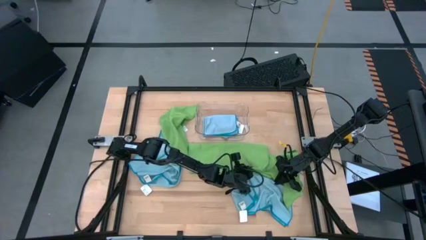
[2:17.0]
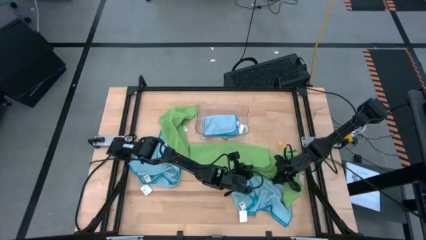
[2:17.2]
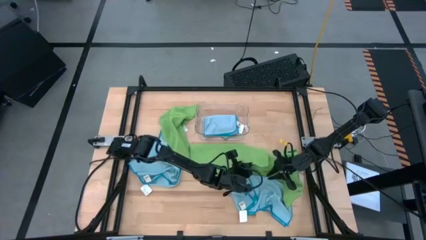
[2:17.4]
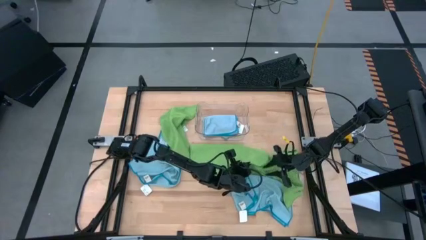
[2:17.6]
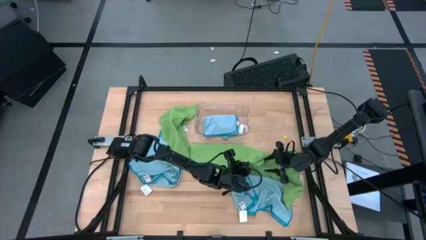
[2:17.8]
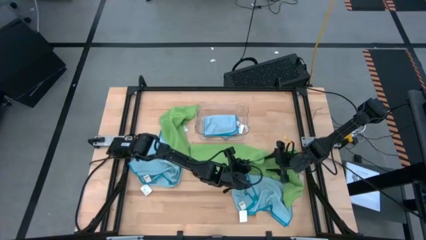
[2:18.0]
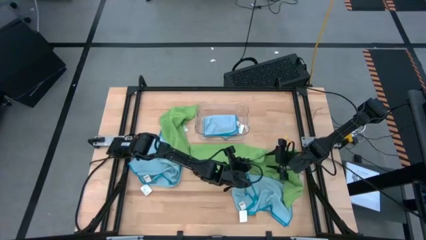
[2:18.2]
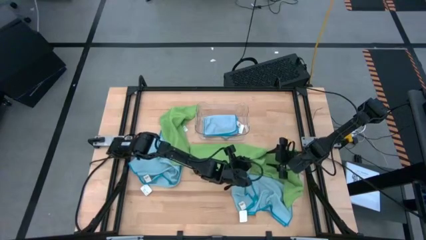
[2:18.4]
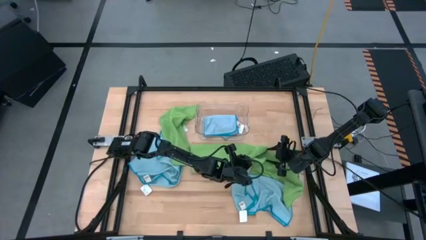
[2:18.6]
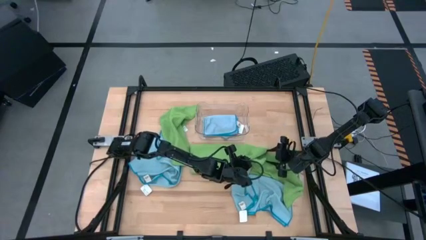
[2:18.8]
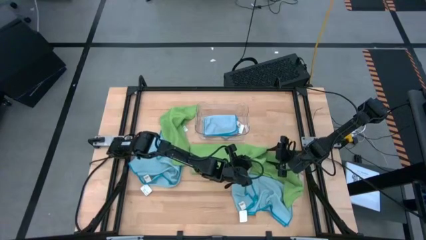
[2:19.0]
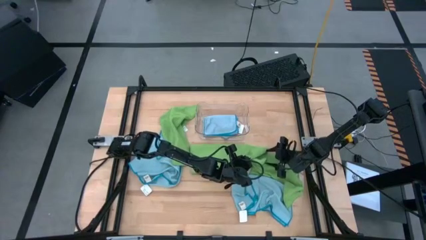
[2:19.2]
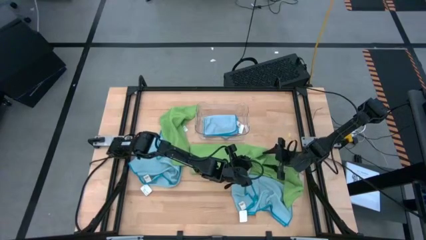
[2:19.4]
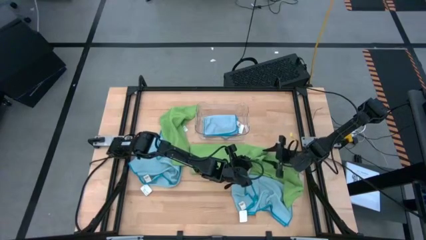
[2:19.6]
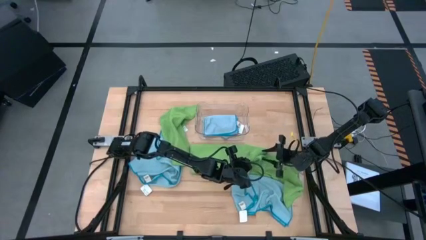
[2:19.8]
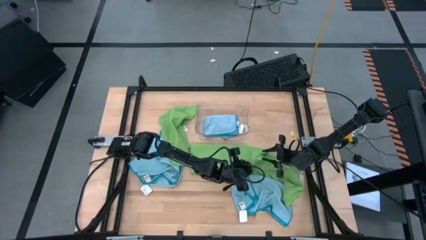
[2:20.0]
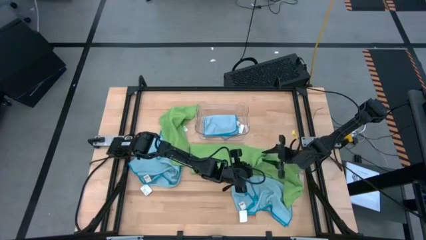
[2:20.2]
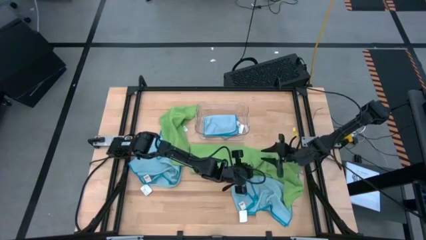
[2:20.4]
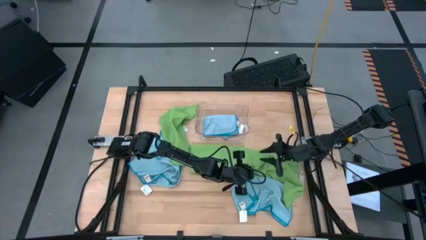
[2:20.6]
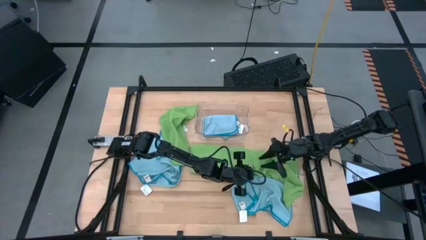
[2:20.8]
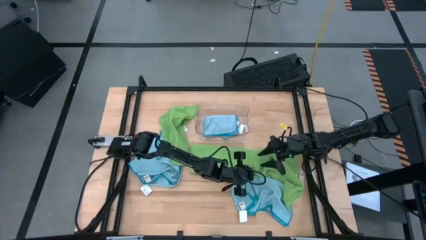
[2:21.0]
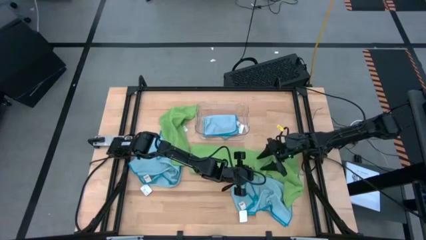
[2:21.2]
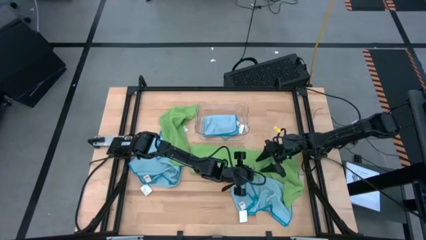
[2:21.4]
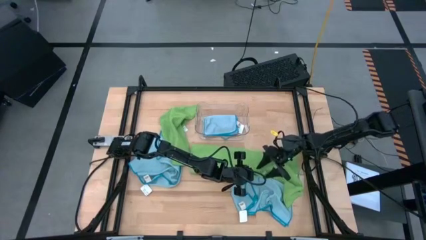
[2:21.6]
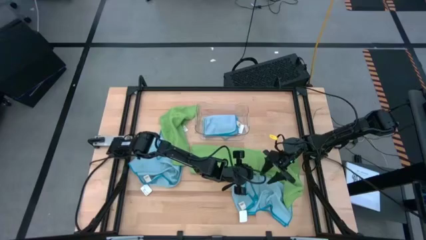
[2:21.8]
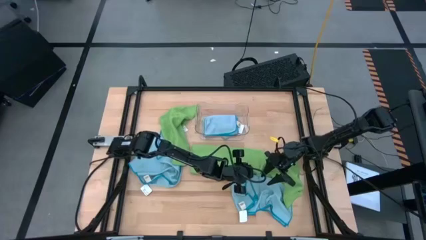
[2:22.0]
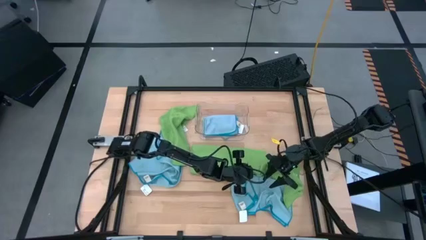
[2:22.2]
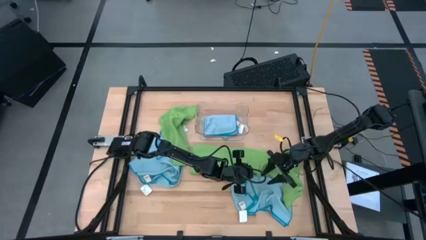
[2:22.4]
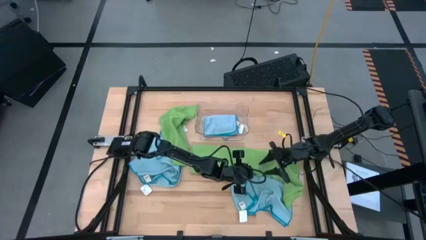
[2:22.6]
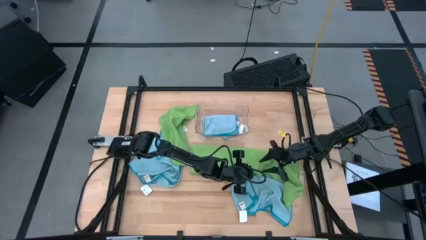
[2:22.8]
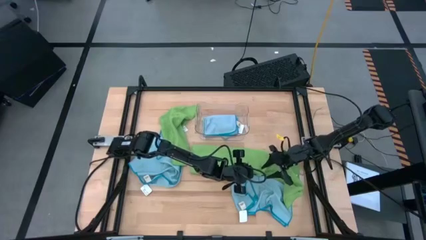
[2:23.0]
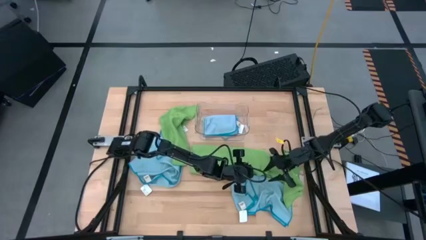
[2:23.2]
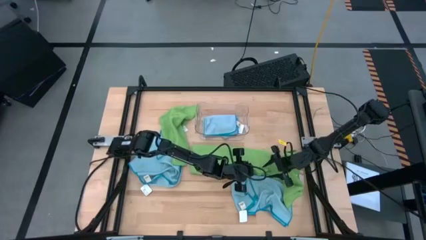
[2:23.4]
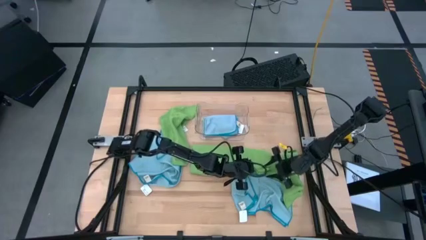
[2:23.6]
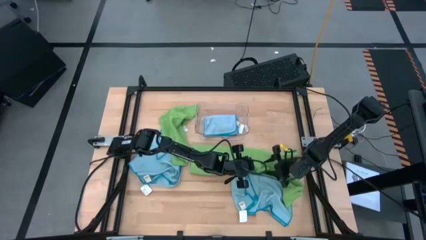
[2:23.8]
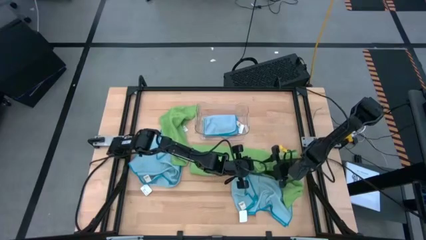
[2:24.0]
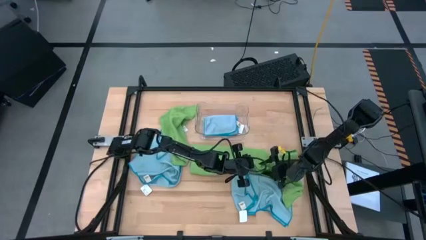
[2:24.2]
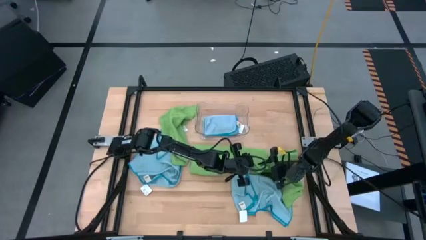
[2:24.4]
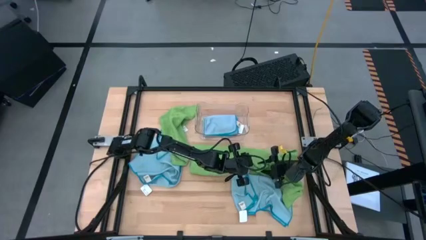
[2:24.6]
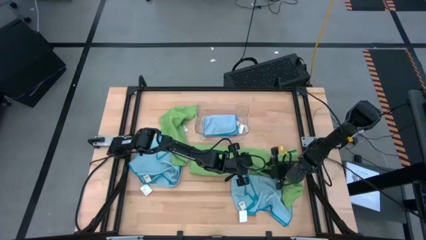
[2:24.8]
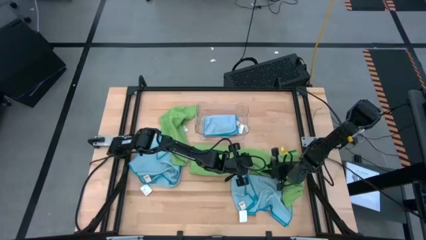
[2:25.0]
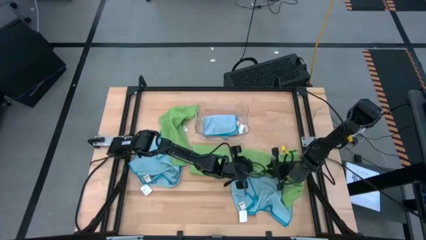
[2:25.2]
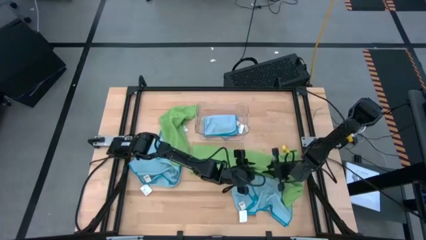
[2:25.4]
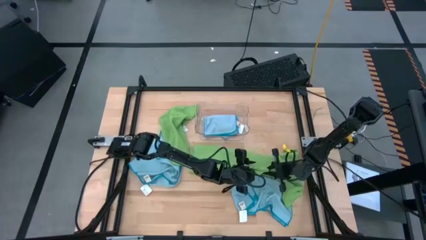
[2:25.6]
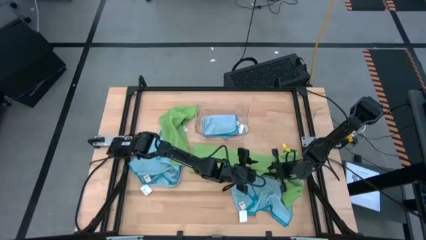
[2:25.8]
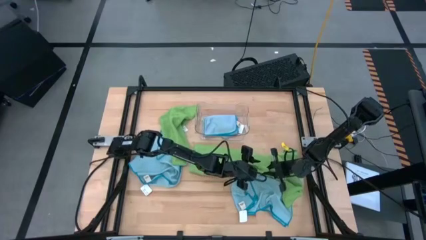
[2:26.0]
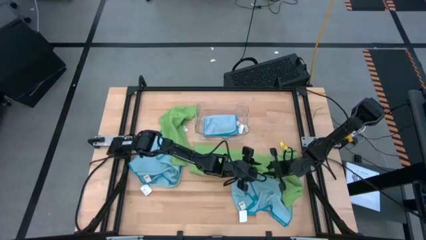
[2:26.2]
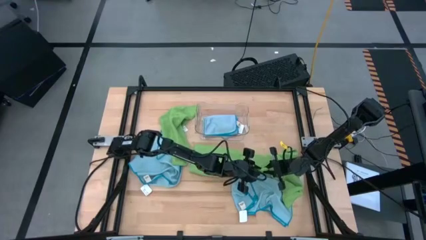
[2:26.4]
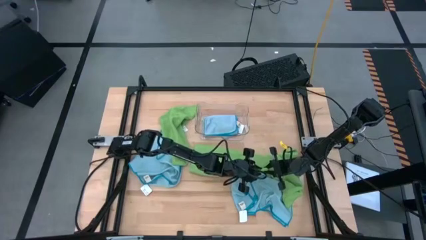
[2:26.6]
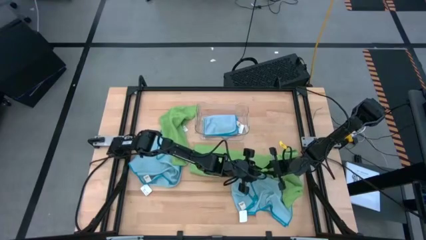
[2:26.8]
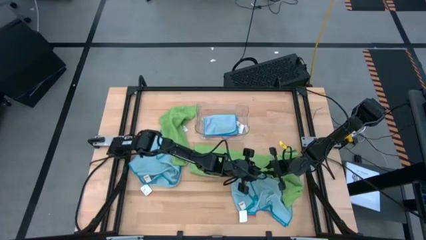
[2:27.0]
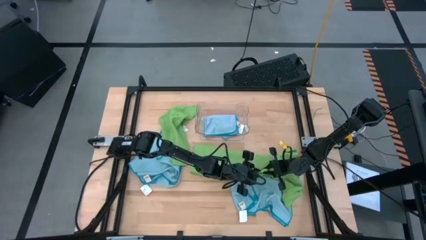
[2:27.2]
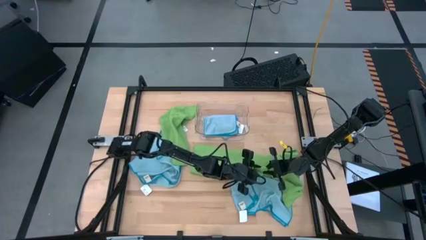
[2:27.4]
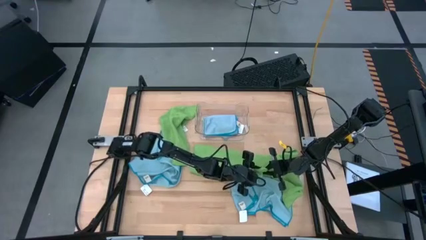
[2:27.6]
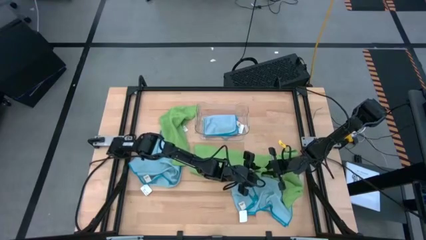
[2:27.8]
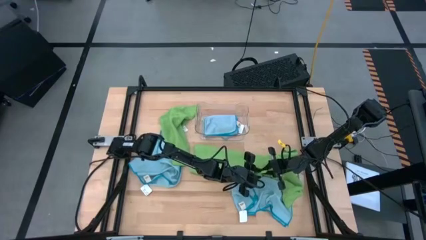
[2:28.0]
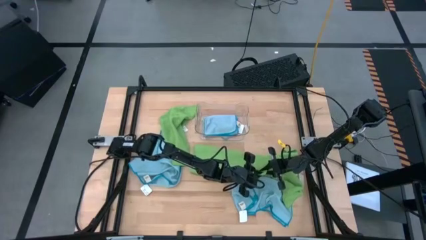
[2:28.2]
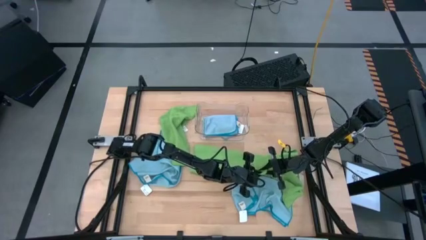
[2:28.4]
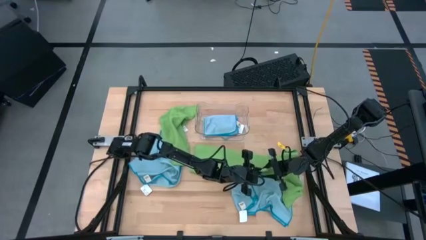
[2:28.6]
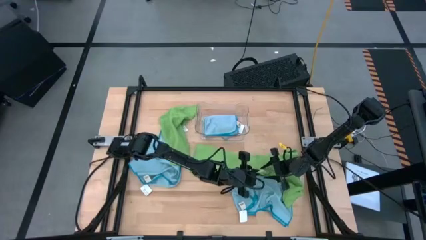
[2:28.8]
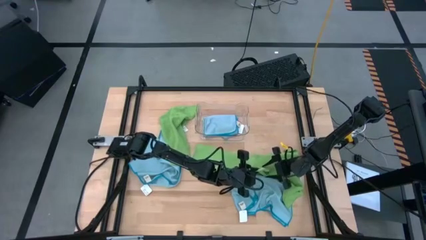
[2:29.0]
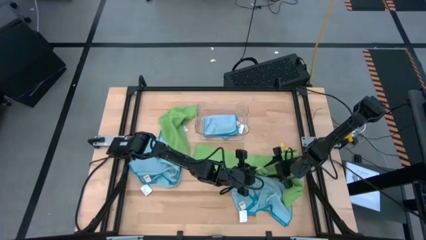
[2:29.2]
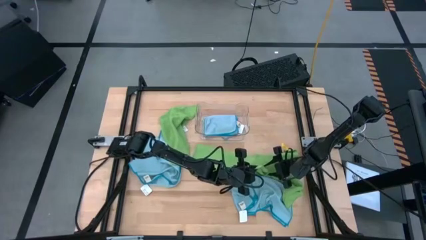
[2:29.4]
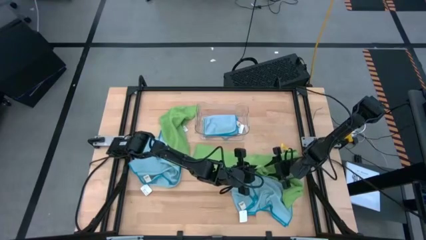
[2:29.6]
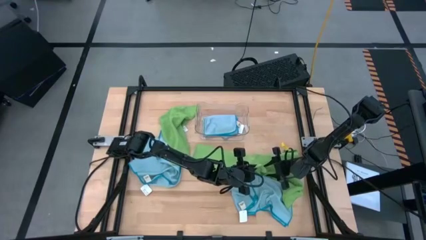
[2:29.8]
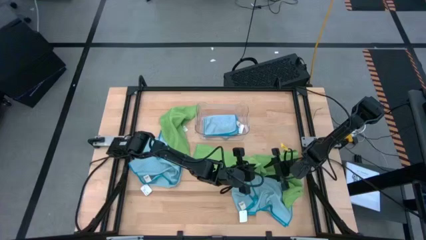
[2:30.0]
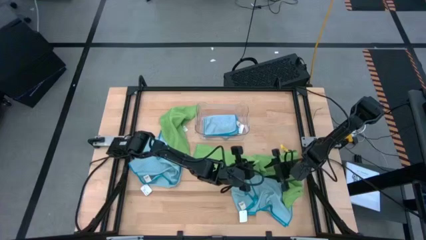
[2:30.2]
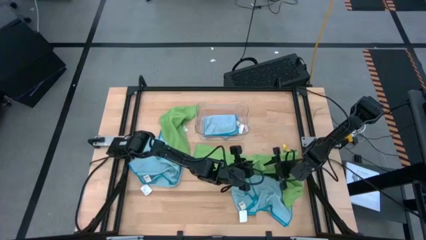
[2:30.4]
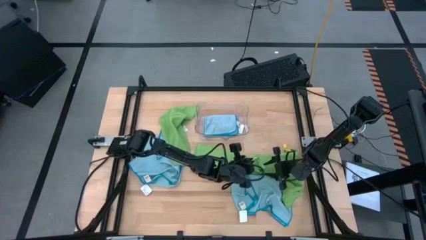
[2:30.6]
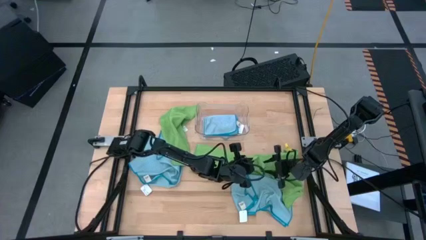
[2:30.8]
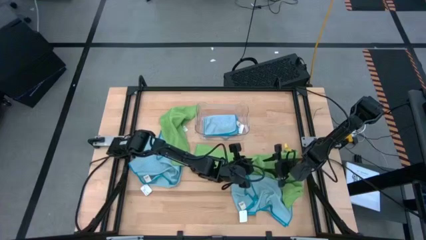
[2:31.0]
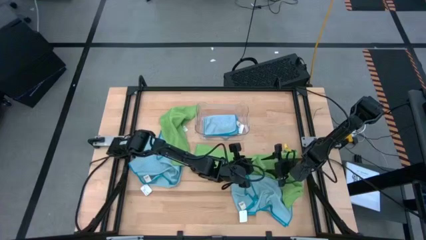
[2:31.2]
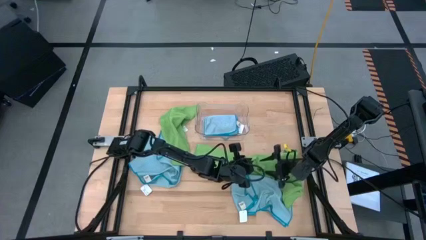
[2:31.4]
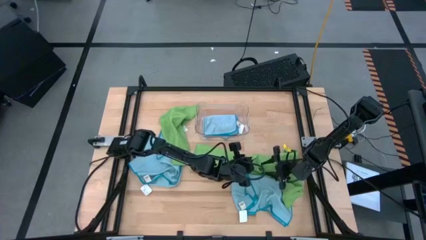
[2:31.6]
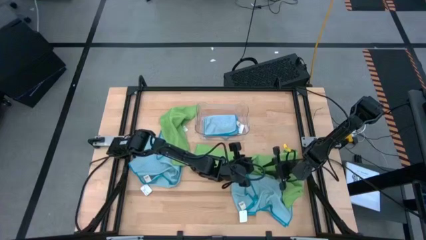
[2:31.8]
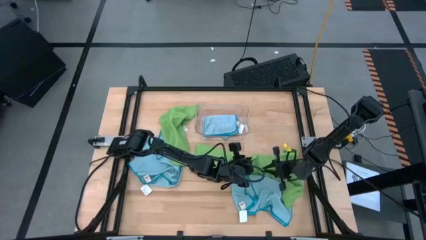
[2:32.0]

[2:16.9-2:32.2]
Task: Fold microfiber towels
Fold the bottom left green microfiber cloth
